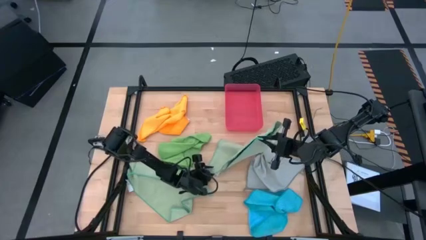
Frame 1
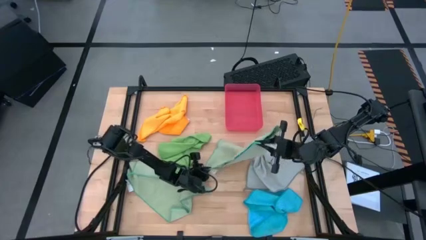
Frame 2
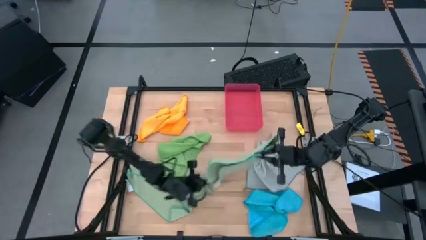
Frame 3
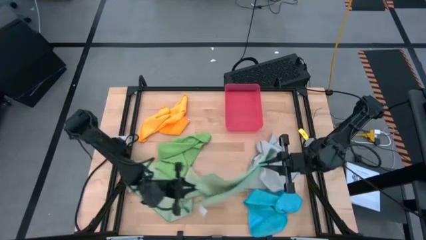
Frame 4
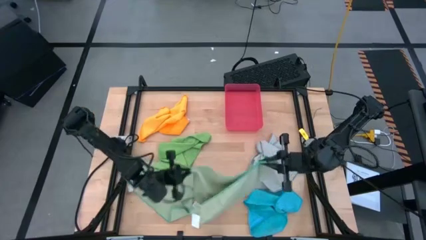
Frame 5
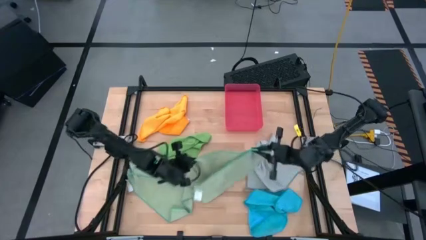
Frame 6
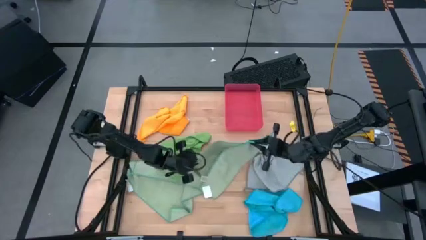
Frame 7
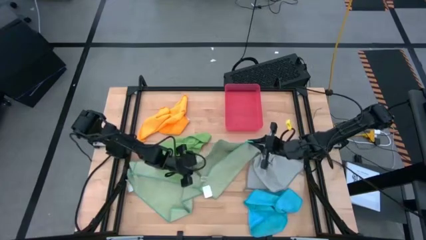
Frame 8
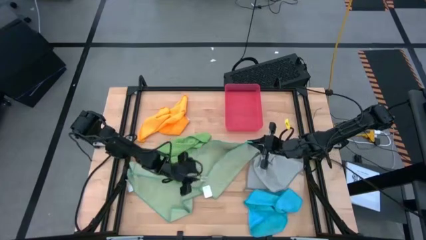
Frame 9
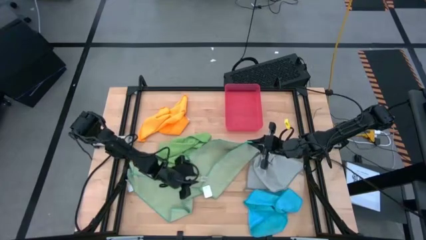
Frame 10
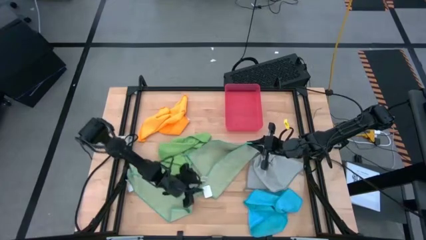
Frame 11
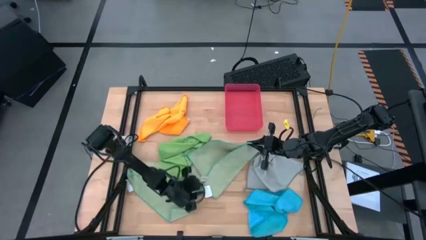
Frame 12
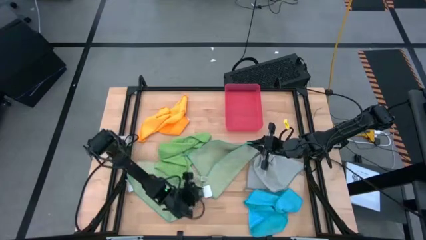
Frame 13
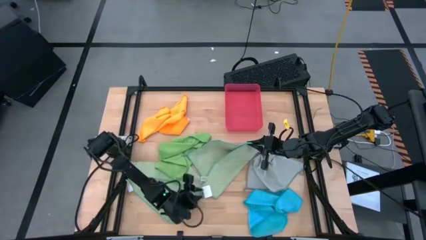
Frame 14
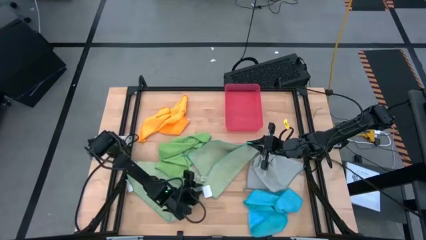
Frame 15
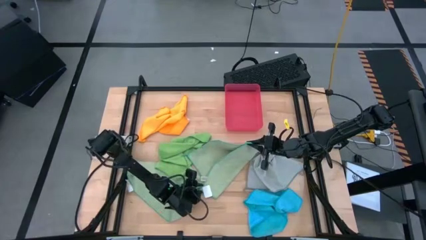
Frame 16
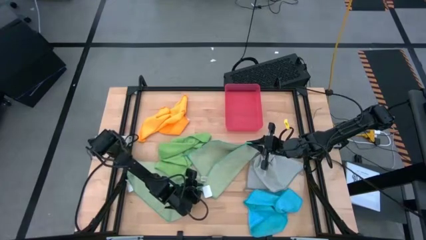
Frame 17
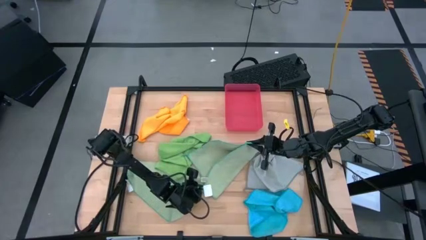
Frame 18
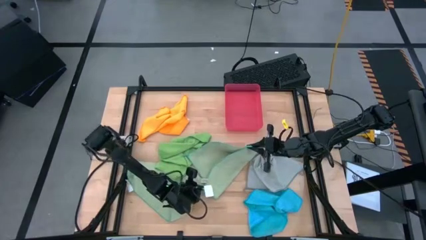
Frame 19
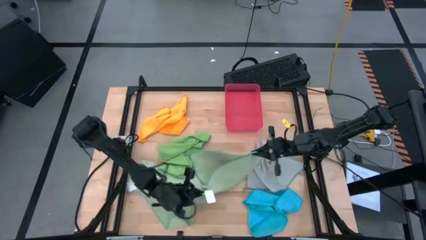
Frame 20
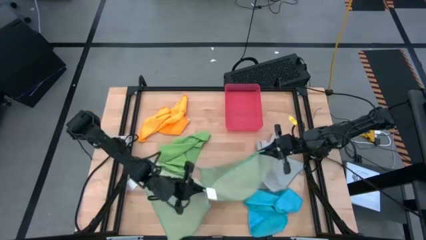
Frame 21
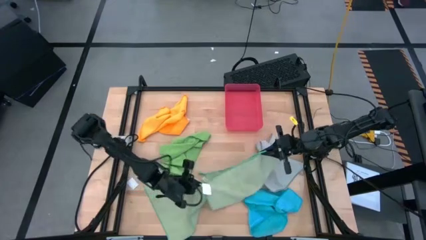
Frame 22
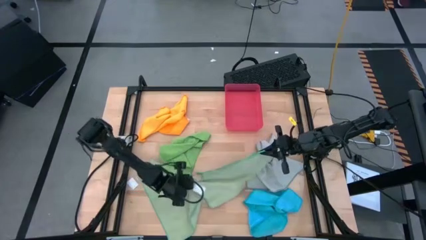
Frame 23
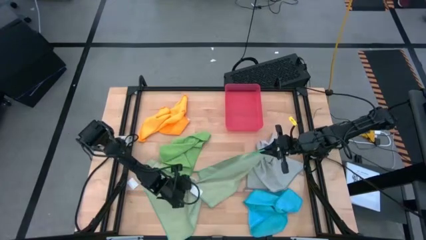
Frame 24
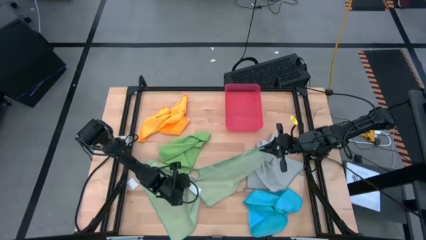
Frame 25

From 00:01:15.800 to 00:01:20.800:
Task: Fold microfiber towels
Fold the right light green microfiber cloth

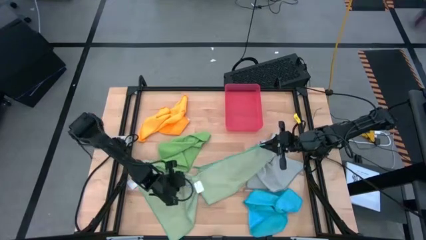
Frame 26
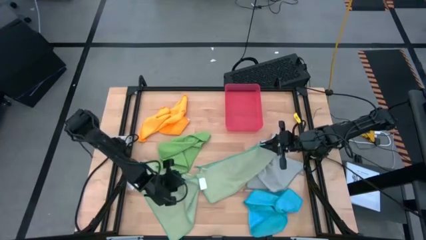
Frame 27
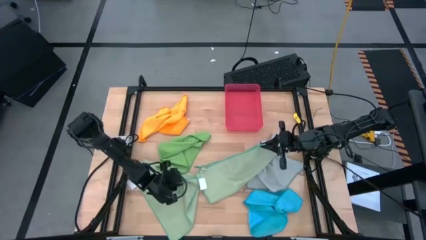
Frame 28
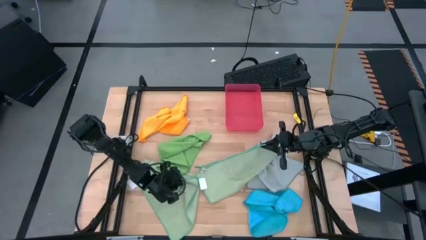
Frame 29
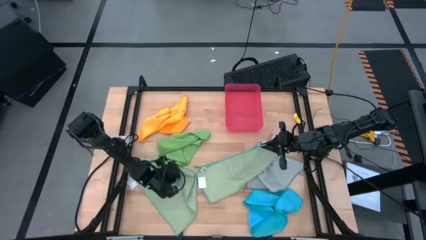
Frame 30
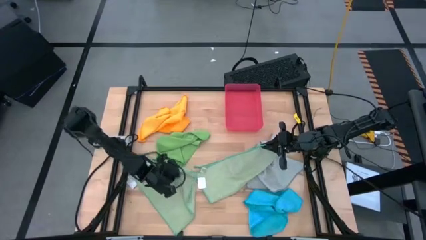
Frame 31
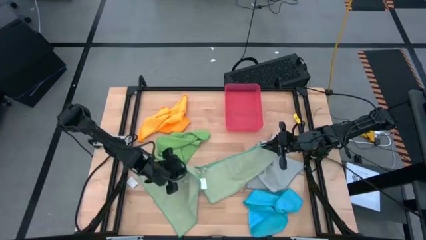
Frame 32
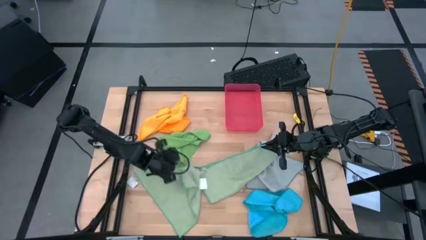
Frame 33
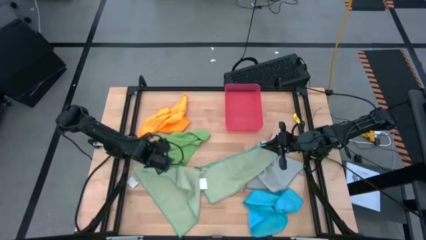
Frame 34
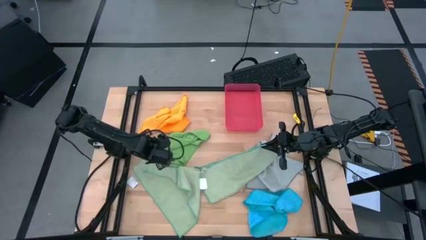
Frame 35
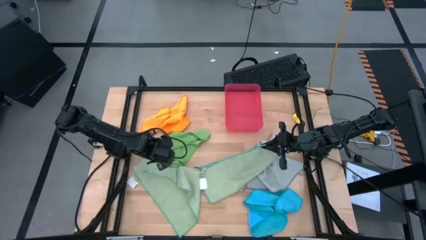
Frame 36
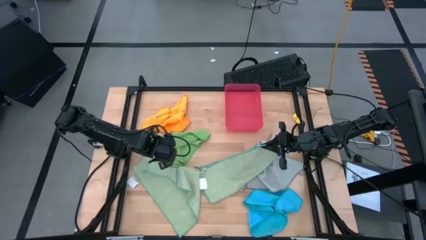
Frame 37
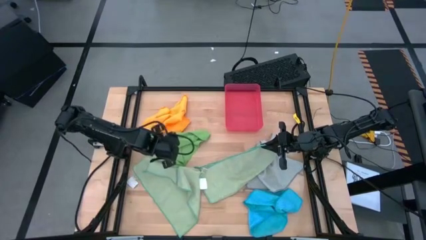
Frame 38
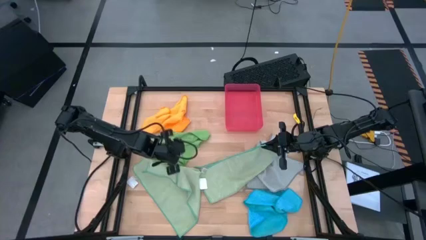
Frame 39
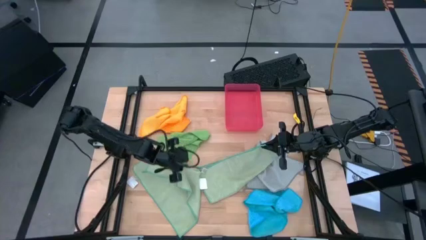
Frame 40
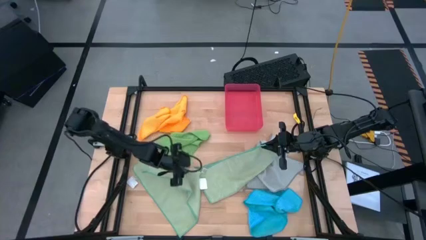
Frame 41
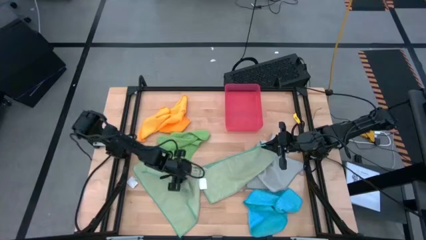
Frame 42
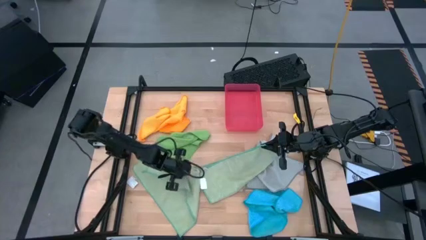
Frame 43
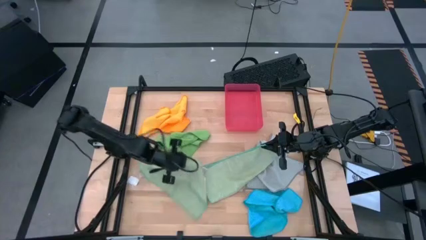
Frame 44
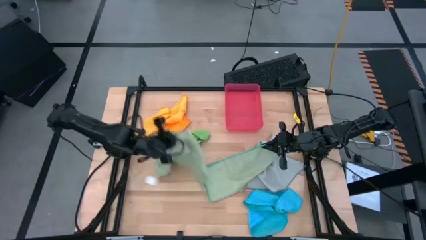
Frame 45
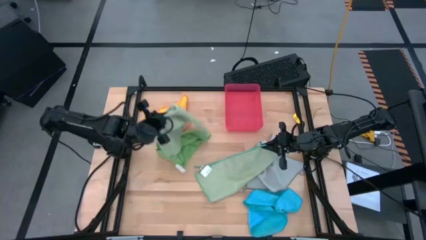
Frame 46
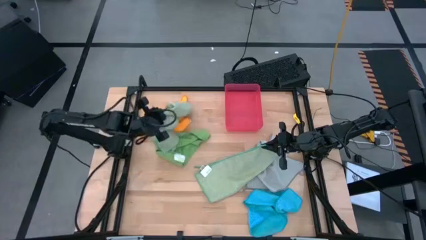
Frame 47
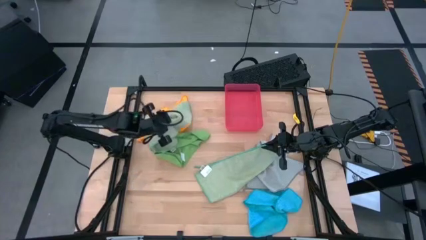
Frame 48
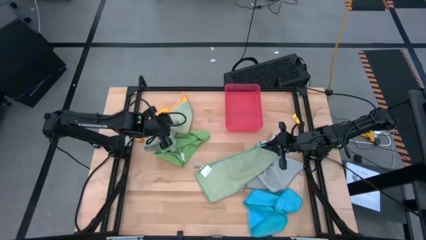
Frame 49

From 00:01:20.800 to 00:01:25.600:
Adjust the left light green microfiber cloth

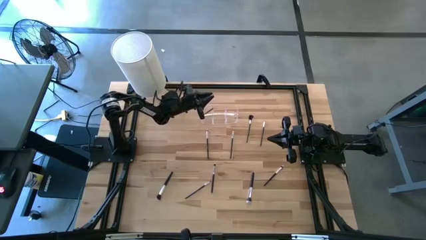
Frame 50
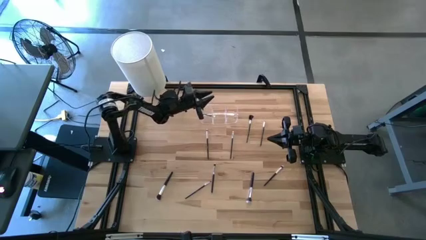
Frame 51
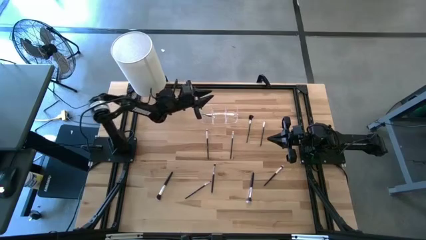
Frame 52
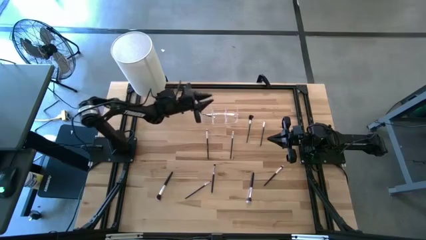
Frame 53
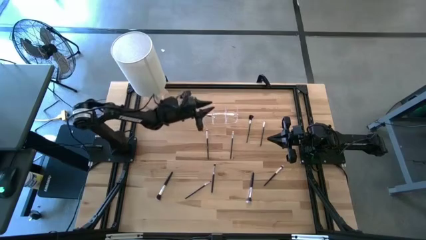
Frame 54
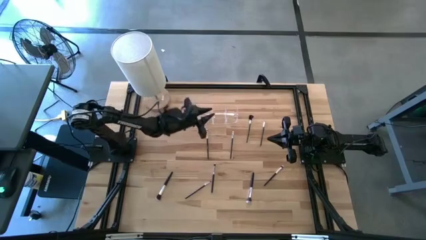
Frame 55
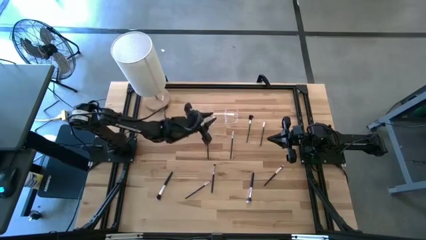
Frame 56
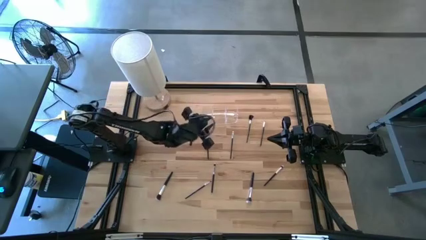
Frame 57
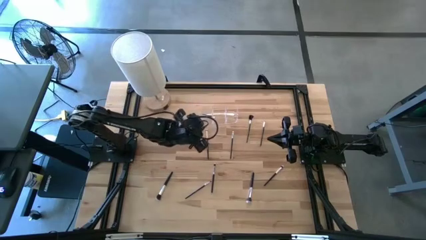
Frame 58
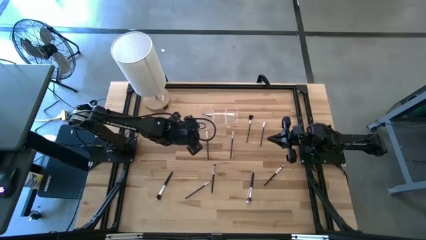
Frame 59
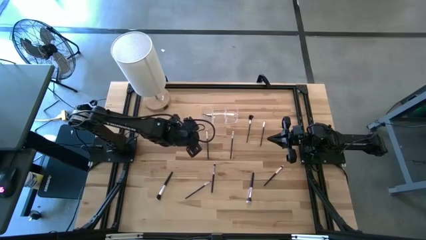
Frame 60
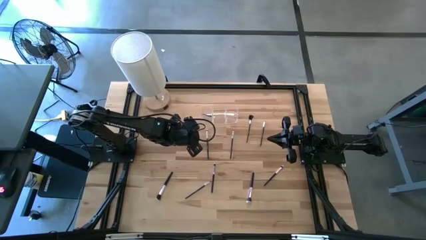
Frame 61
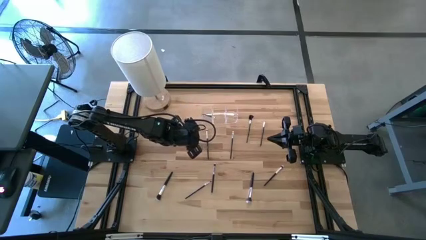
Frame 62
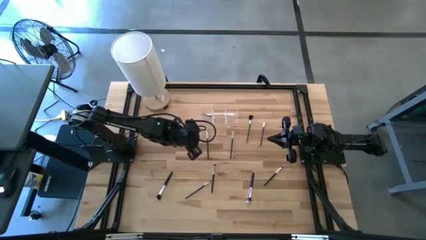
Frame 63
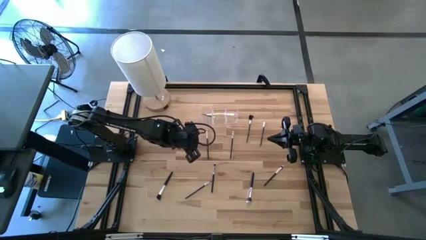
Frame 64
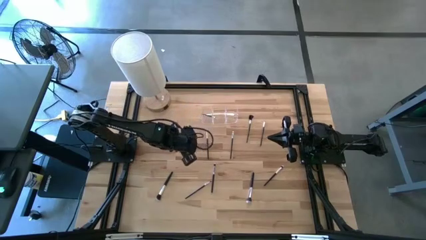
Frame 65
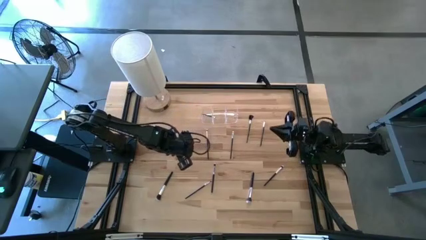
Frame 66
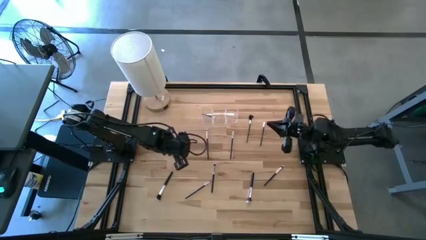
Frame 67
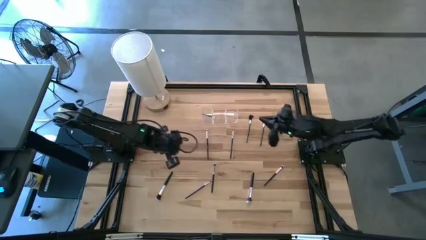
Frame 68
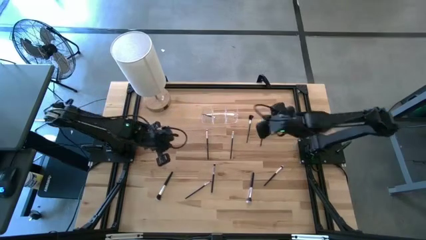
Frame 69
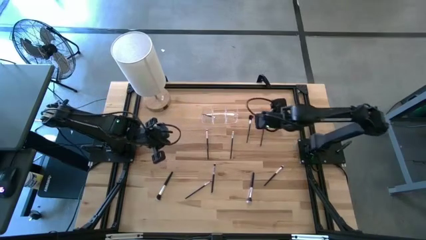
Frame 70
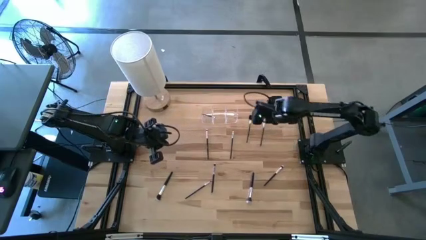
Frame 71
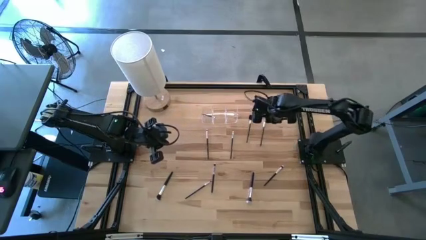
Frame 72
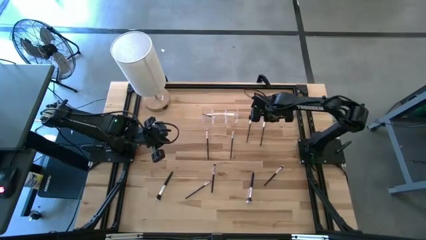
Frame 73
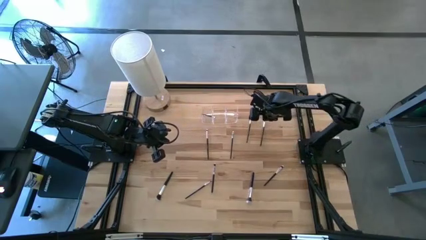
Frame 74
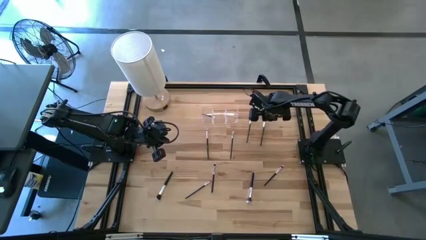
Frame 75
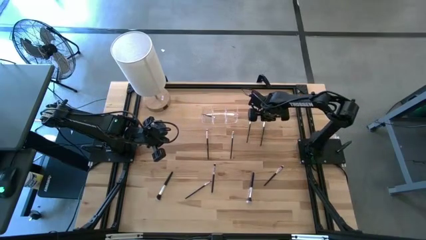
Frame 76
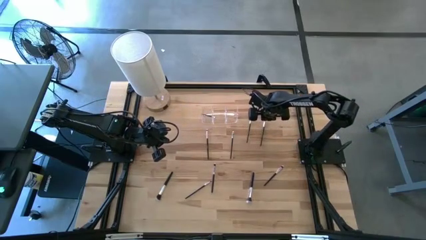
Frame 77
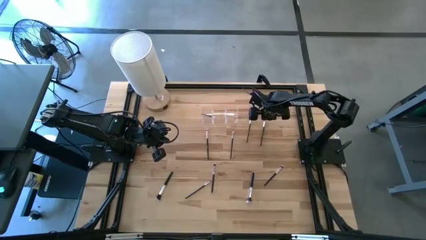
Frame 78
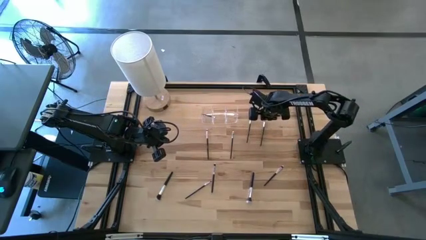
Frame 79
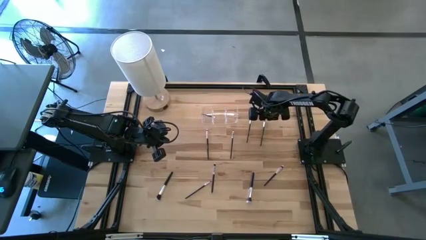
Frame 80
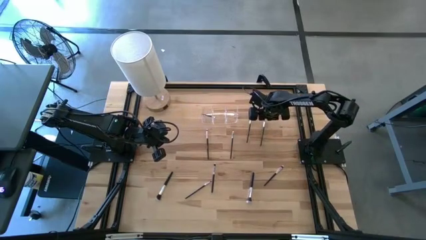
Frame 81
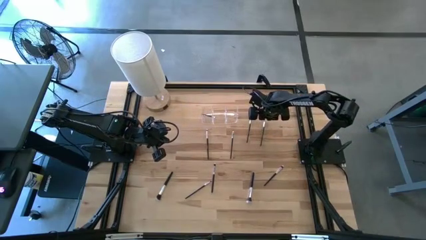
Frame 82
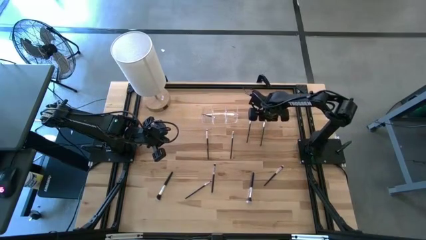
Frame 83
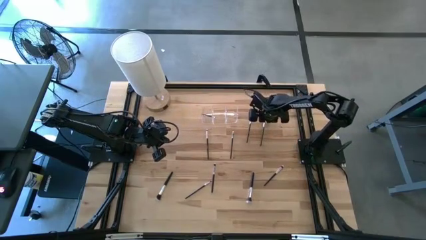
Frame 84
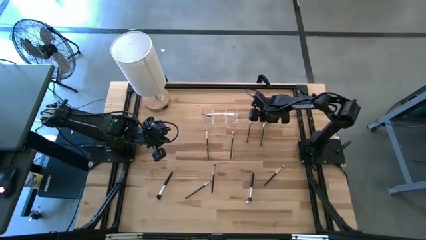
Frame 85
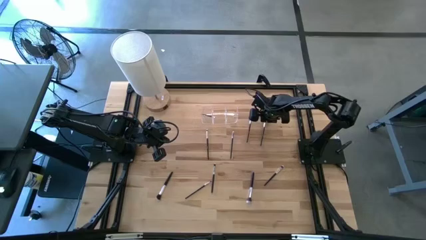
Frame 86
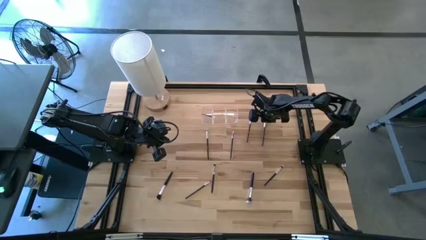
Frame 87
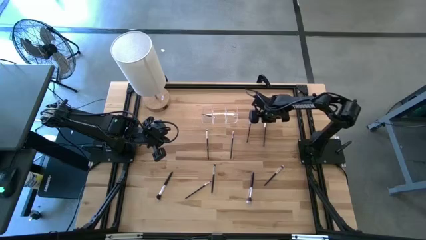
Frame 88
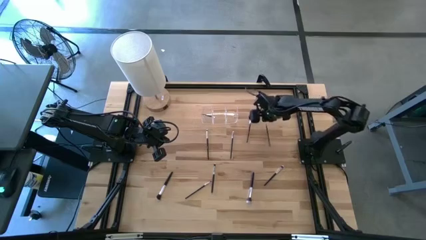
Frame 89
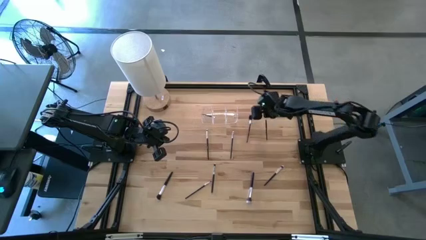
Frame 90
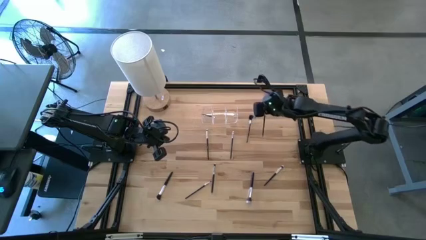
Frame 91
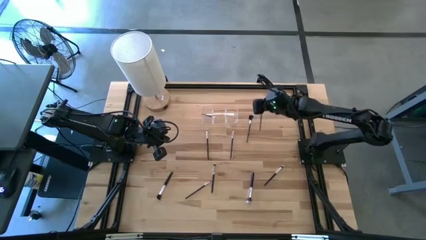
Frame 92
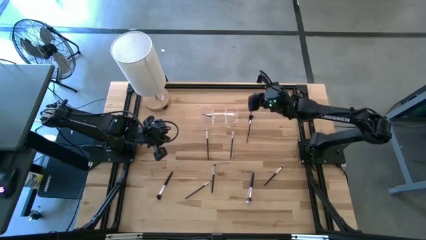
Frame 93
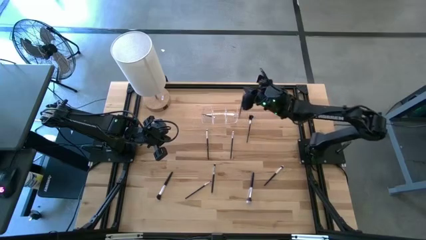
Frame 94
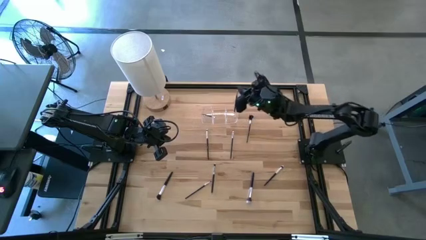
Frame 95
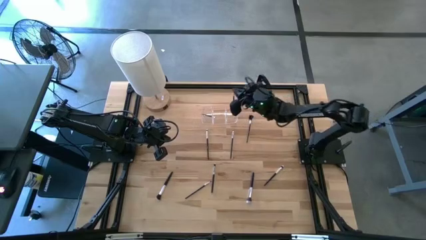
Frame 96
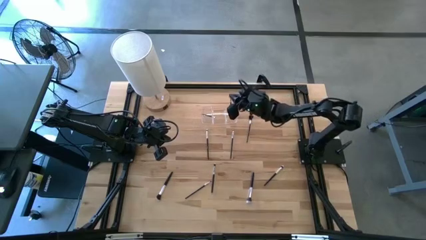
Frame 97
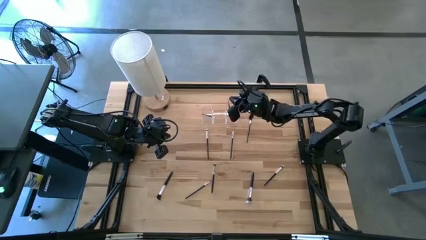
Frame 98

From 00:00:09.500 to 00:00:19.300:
Task: Put items in baskets/containers
Put the black liner brush into the transparent organizer
